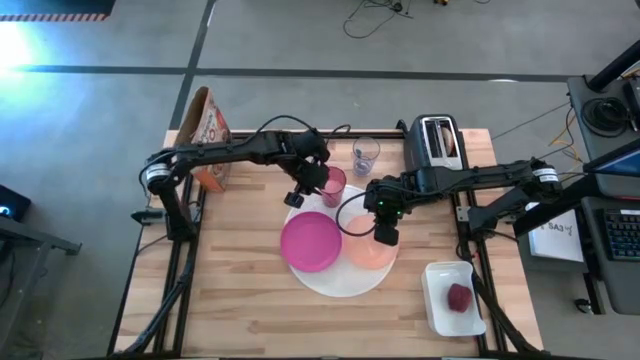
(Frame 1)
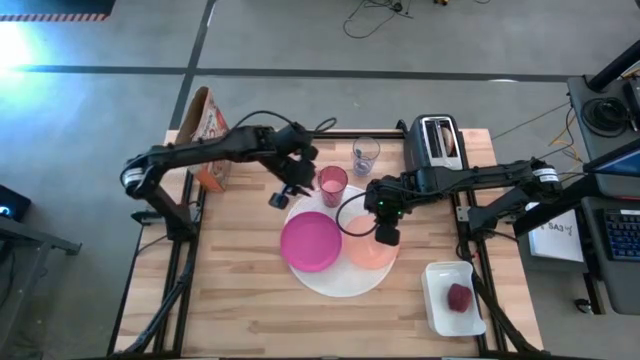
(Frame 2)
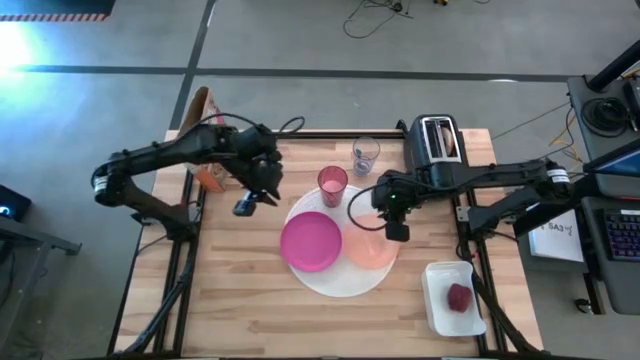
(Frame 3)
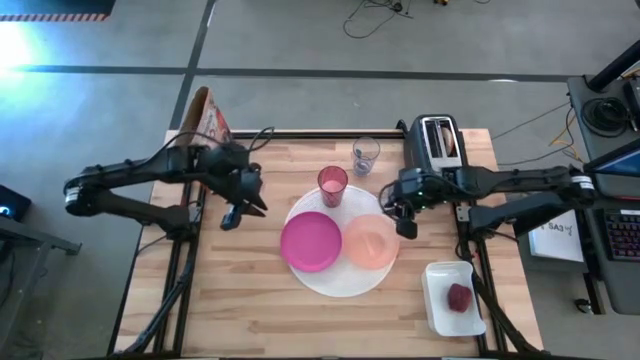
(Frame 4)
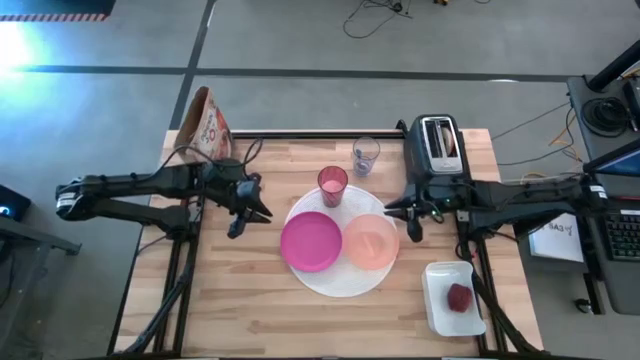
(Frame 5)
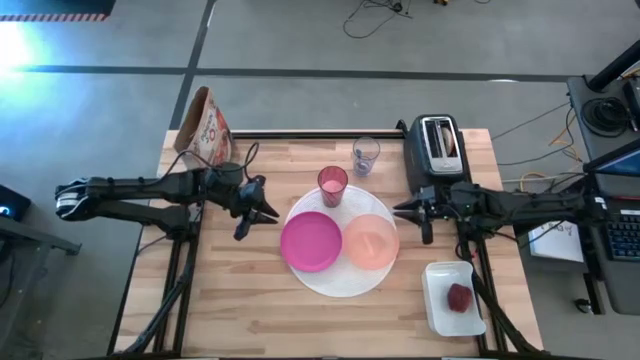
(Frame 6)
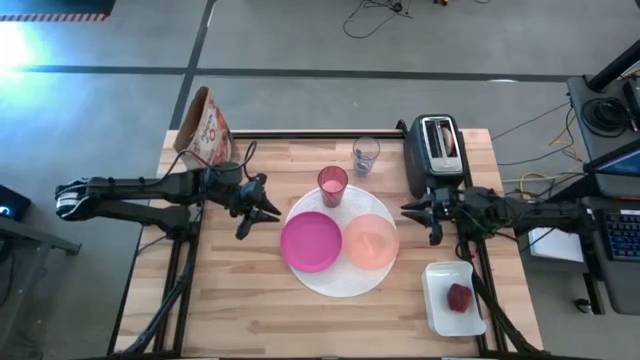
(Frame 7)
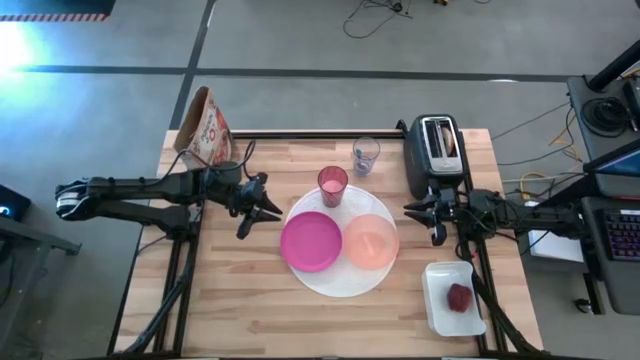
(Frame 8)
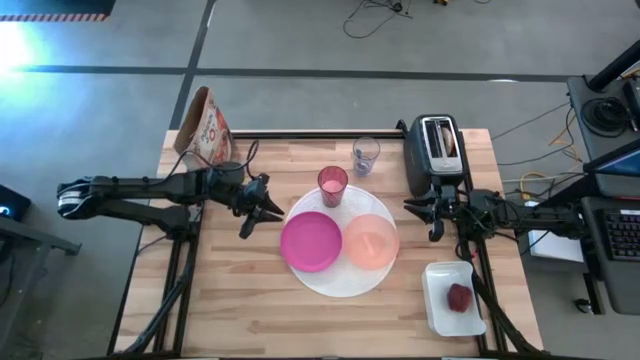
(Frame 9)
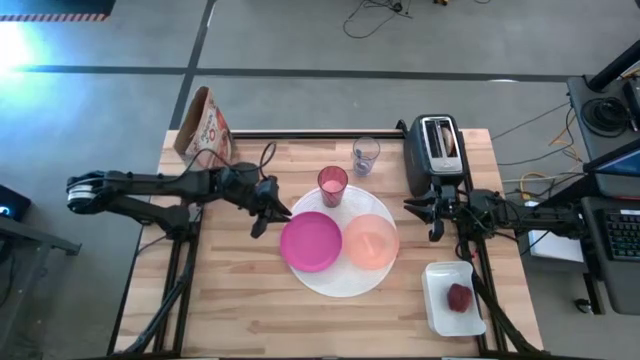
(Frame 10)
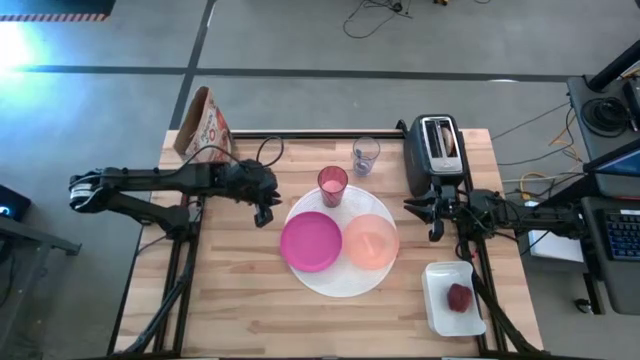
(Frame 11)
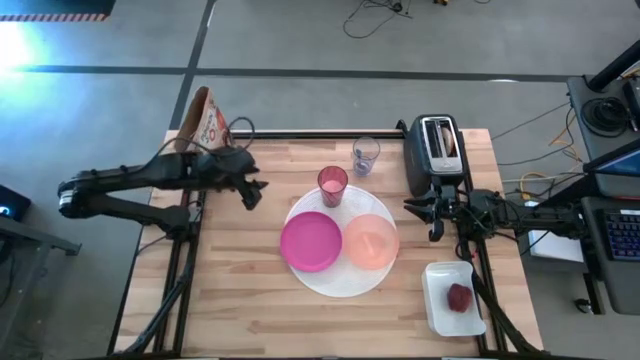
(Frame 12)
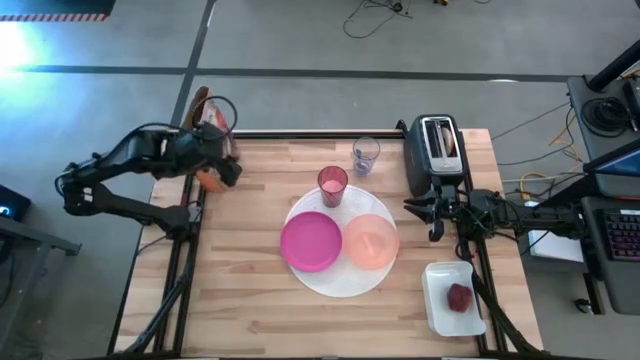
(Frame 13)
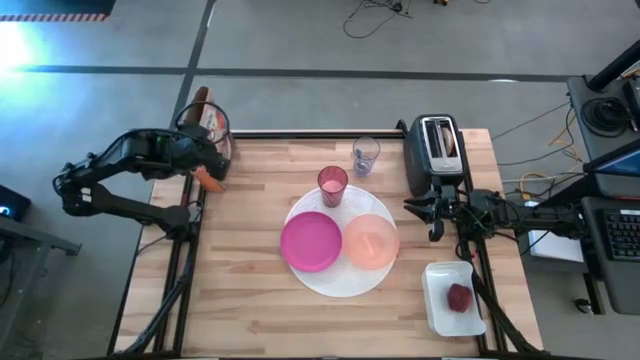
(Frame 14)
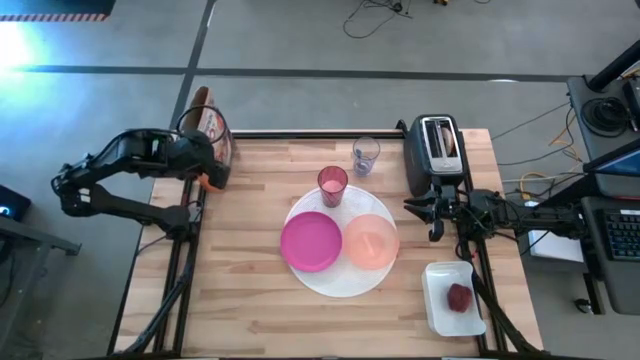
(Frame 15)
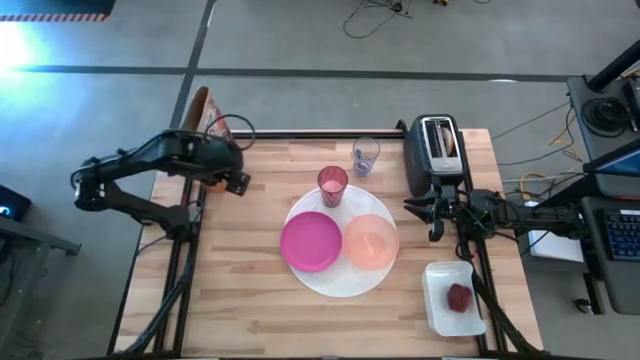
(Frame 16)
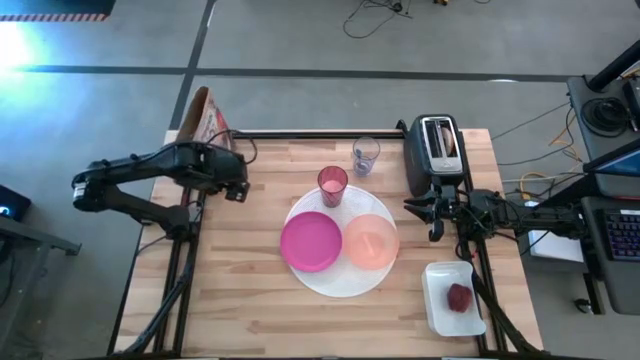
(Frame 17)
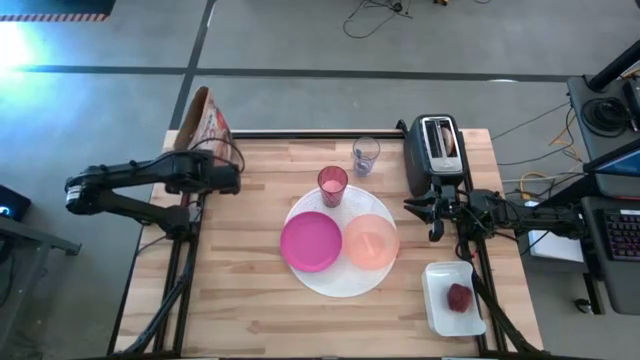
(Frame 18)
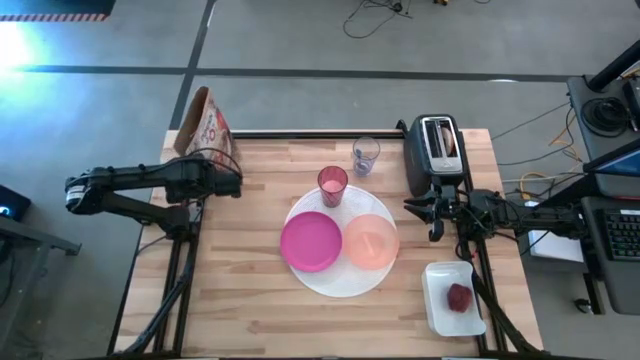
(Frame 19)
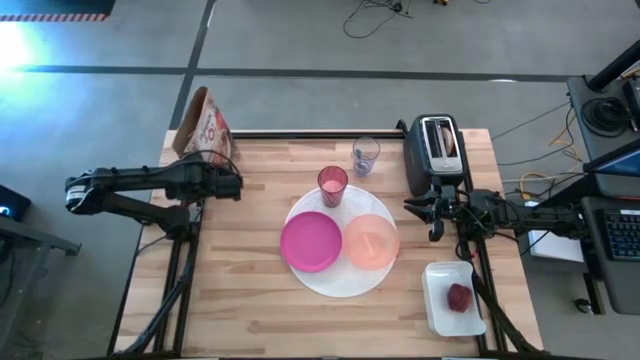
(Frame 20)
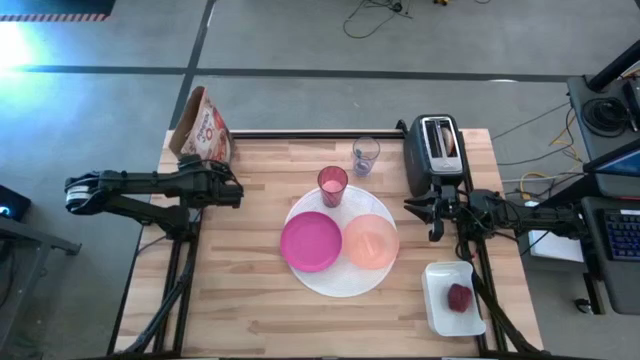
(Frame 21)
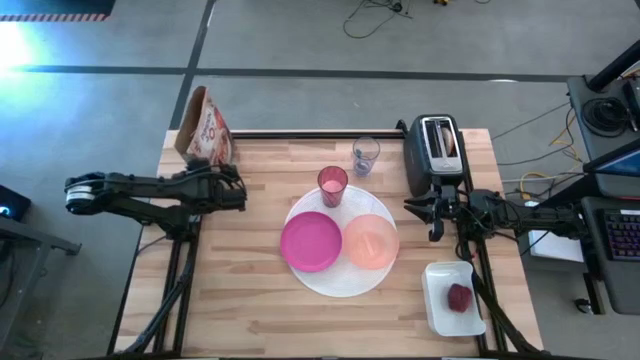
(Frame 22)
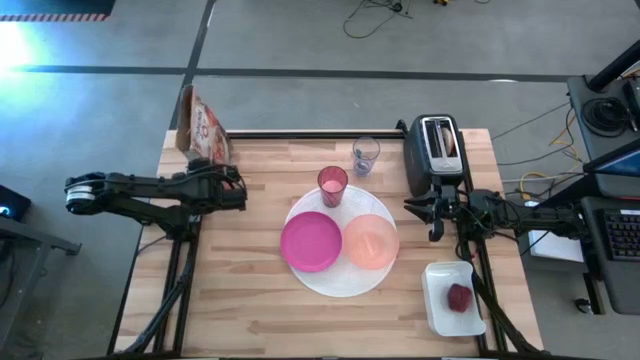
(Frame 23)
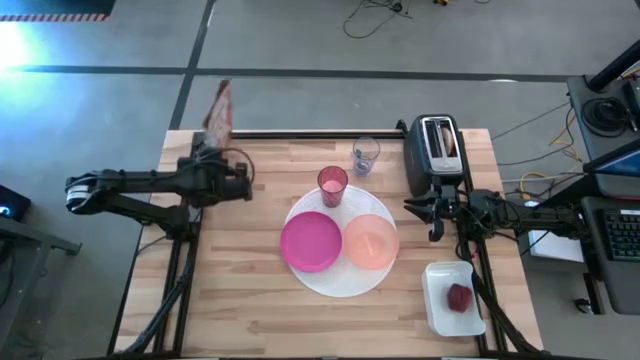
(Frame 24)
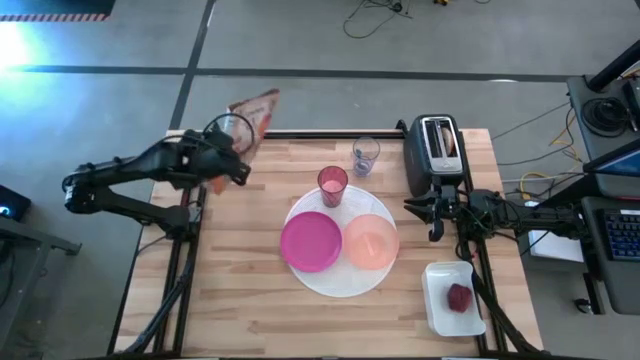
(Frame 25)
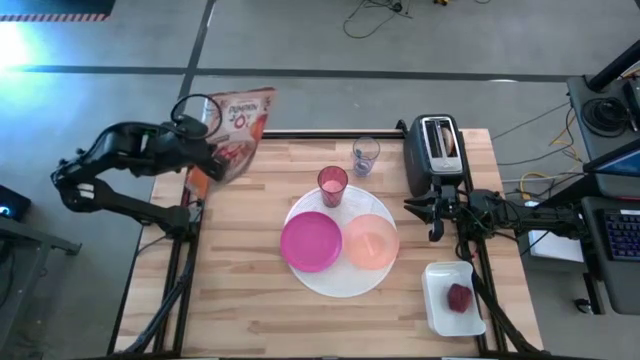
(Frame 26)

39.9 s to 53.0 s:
Task: Arrange a breakfast setting
Pour the cereal into the orange bowl
